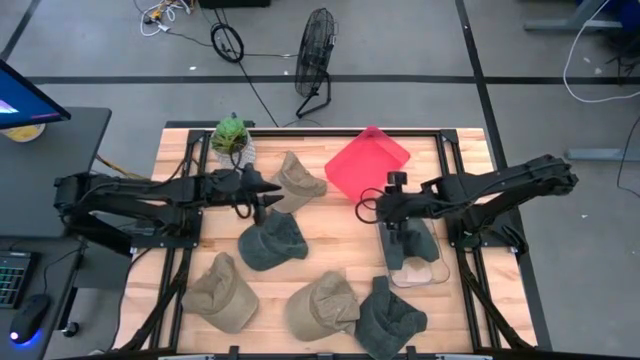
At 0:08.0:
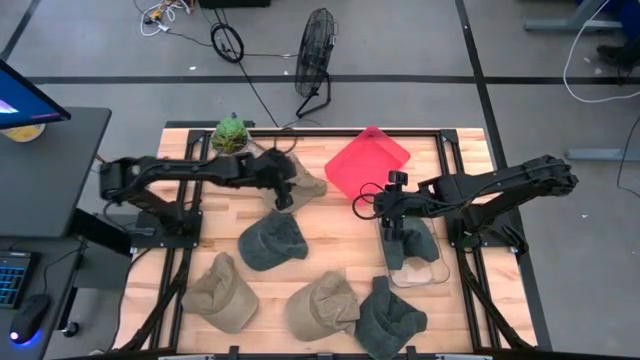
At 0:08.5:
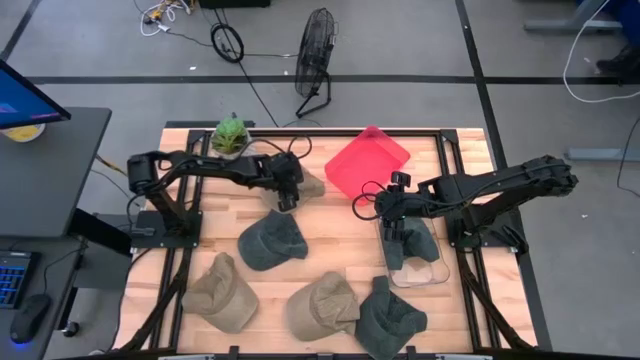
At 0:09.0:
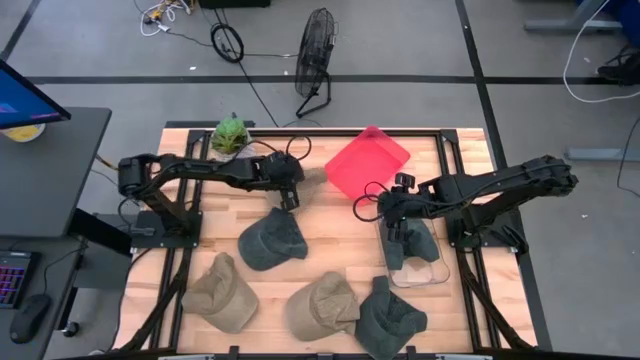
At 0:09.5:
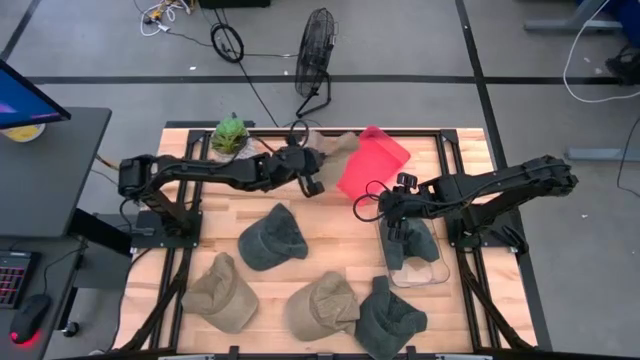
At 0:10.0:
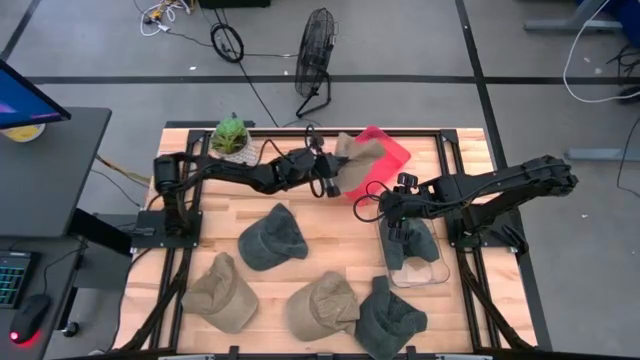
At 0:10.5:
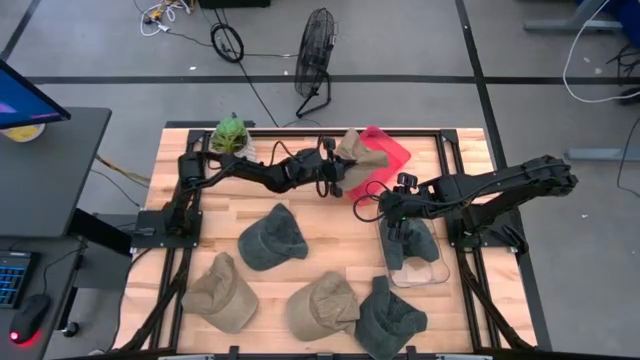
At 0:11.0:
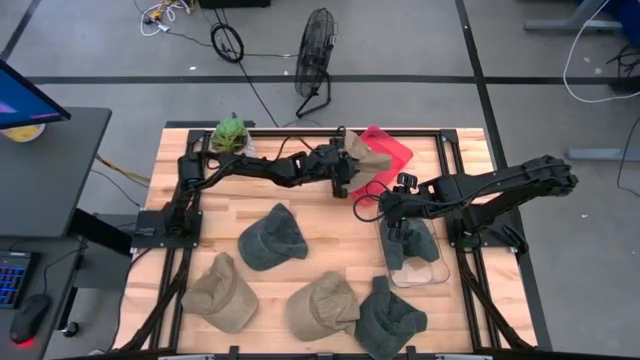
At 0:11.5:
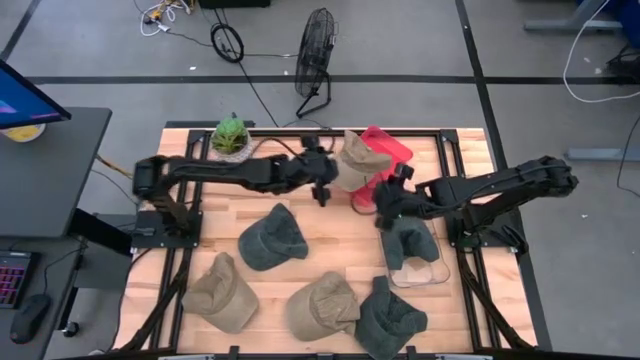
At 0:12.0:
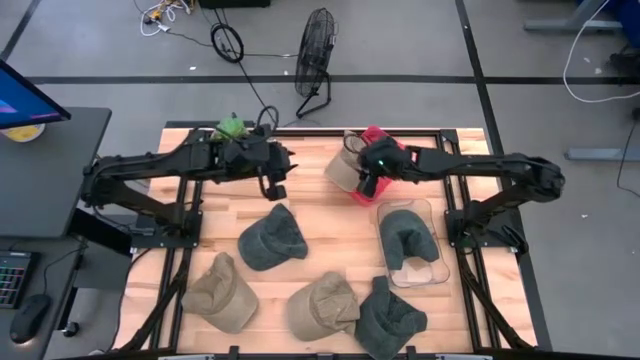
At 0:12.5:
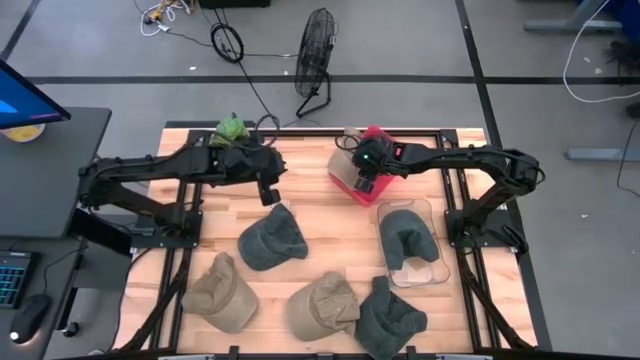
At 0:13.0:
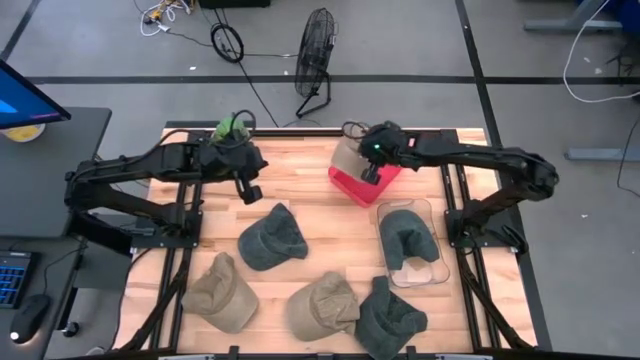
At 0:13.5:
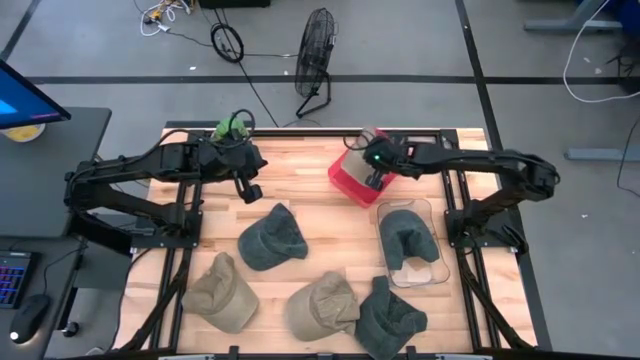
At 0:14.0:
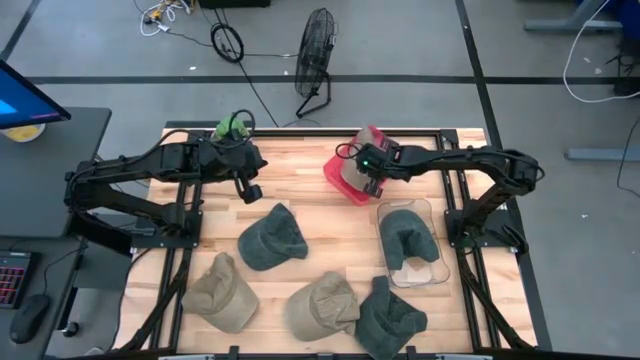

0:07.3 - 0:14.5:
Task: Pick & Place hat
Put the top brown cap into the red bin

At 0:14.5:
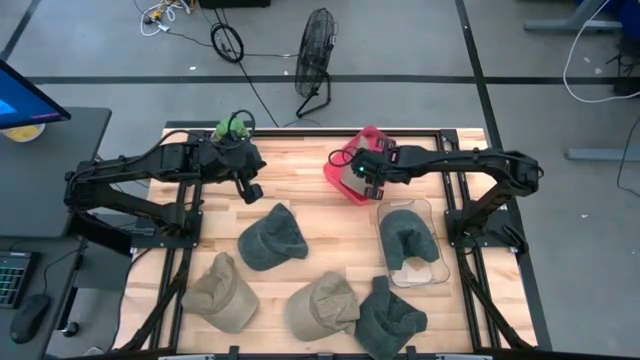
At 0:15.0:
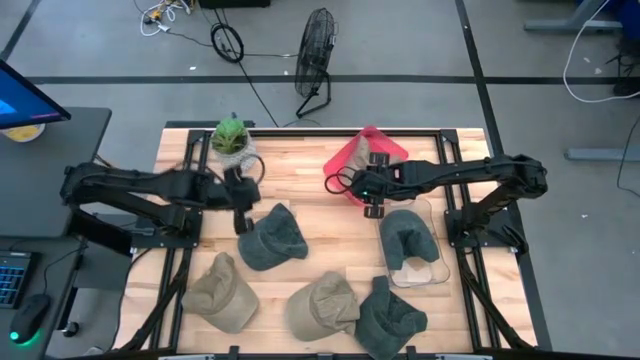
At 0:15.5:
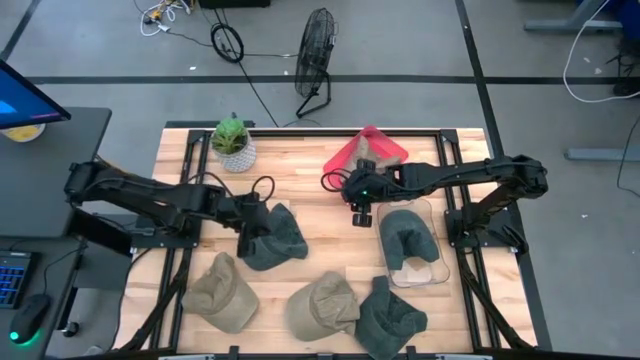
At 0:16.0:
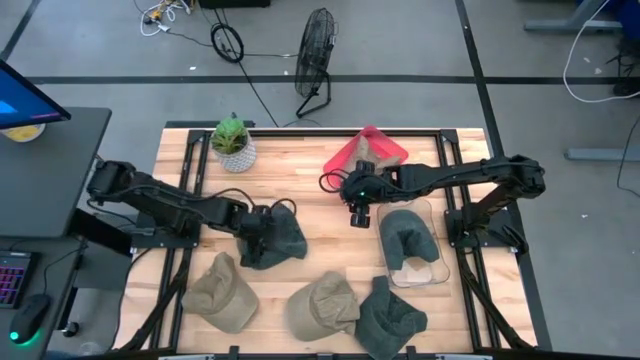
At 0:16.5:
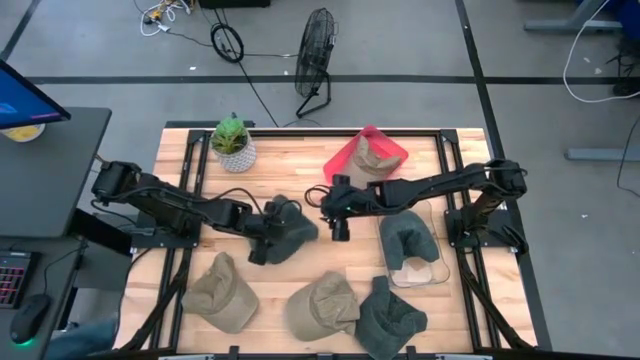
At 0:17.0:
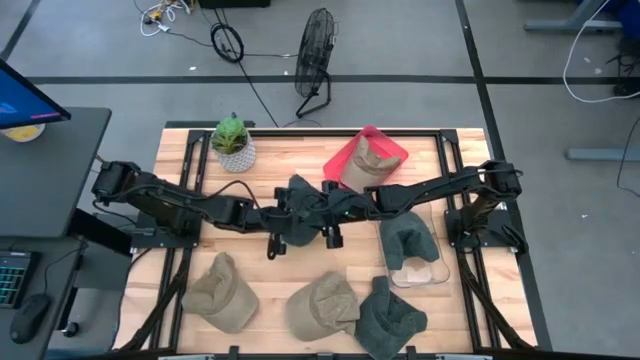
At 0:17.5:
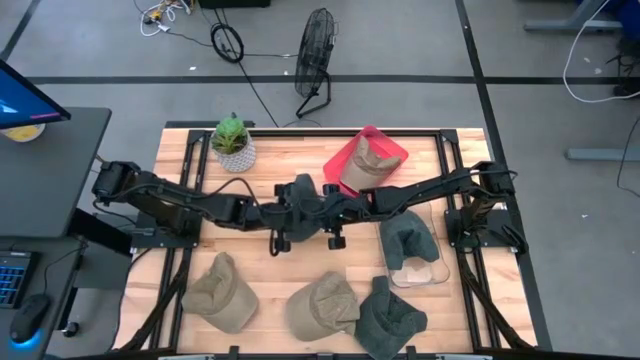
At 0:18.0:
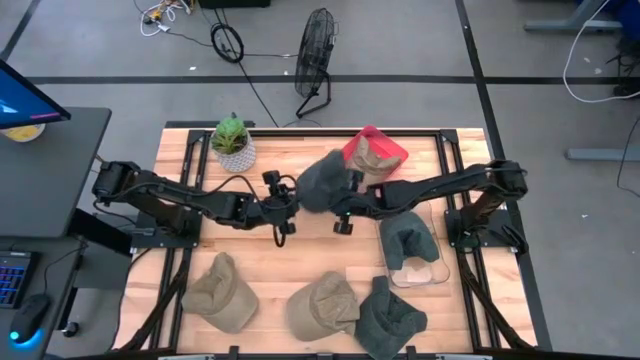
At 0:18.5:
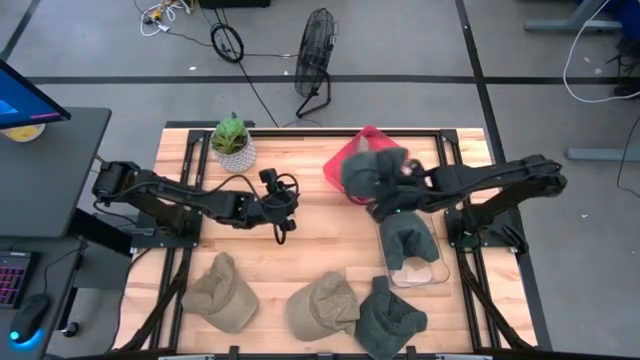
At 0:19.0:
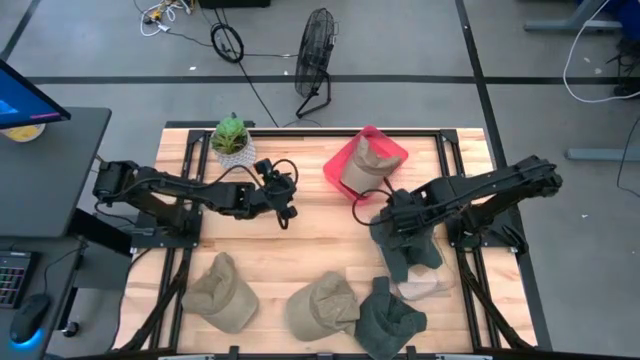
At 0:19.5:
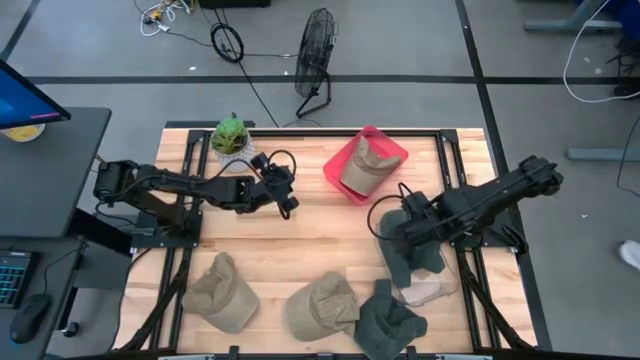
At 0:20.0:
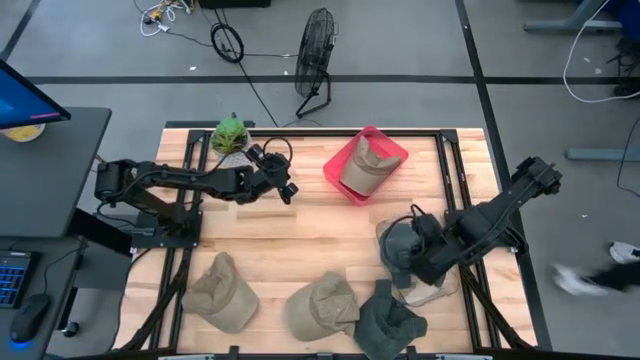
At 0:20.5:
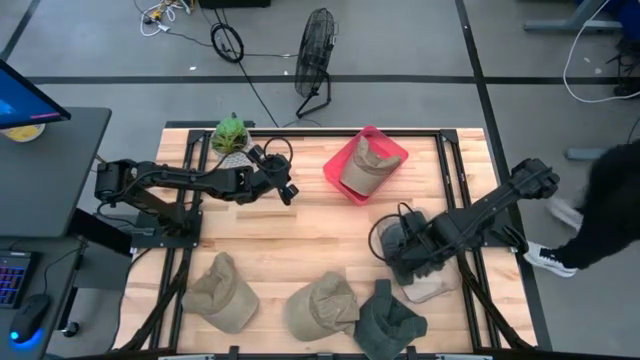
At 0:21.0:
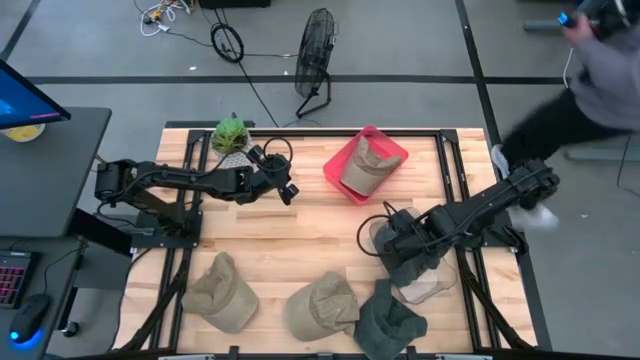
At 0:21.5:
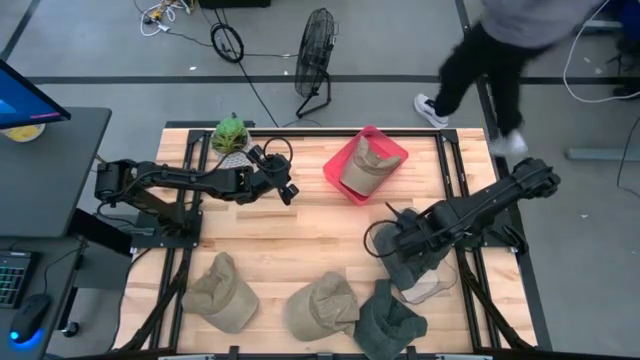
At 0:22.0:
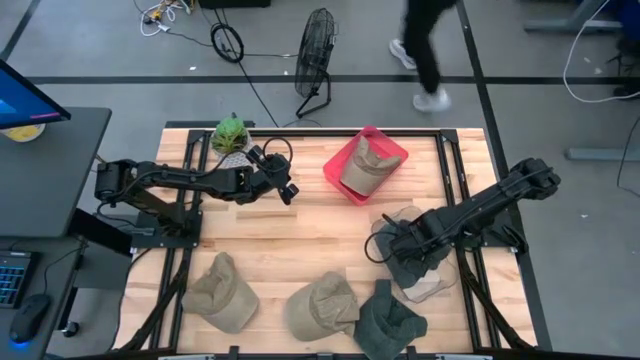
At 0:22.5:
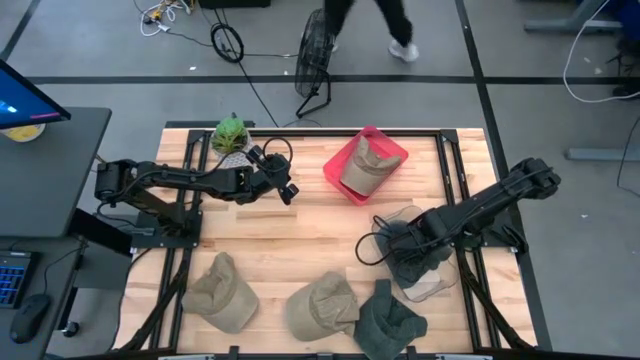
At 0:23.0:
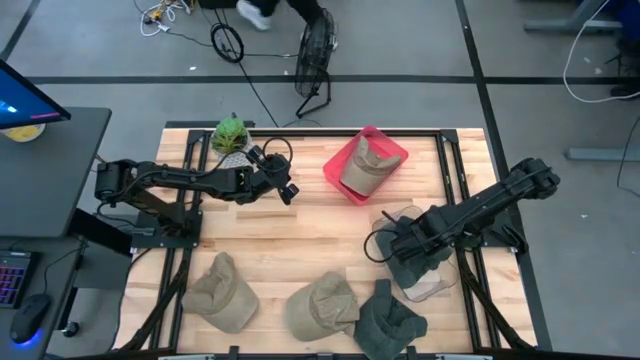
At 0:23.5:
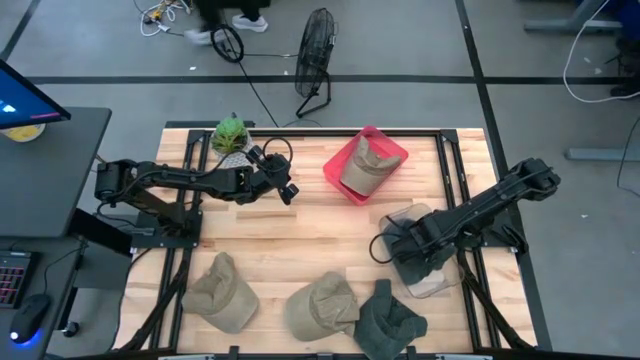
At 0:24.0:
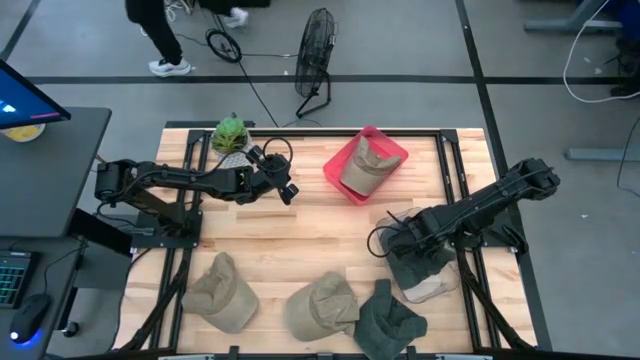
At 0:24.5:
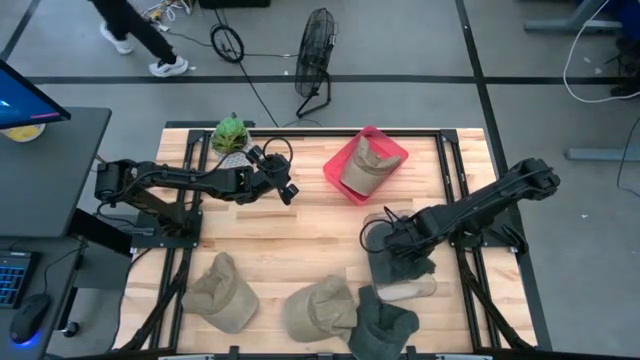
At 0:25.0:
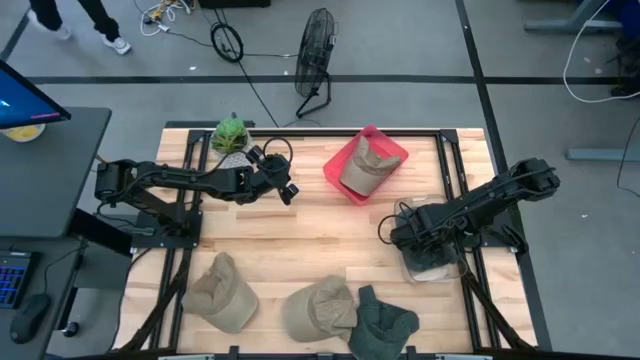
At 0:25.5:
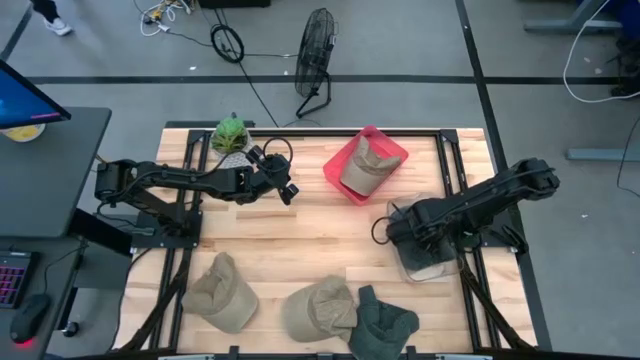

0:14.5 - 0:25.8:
Put the left gray cap into the transparent bin

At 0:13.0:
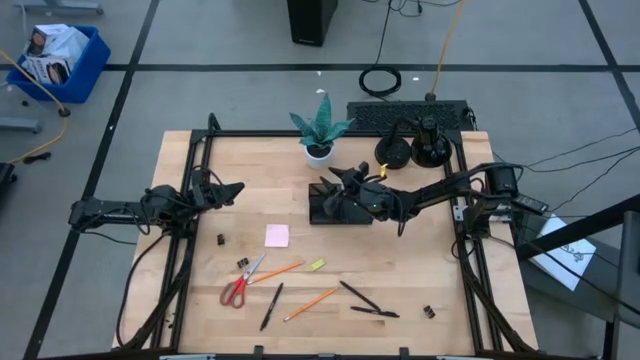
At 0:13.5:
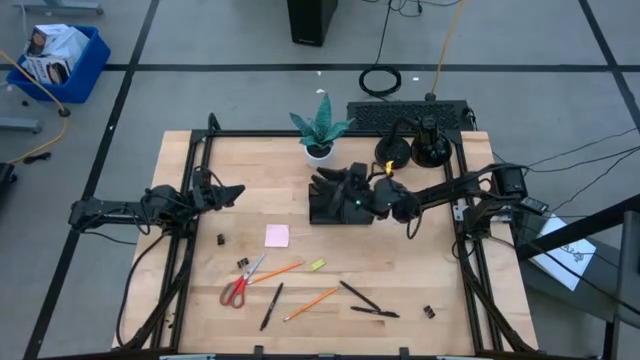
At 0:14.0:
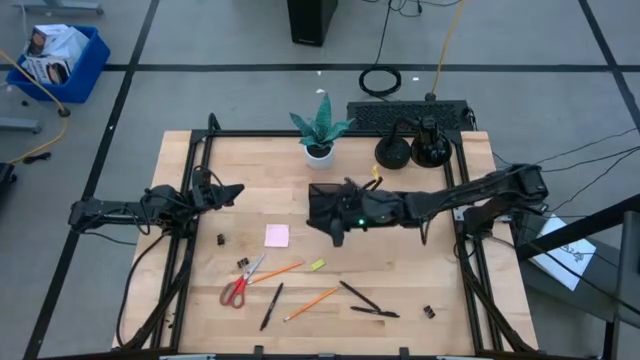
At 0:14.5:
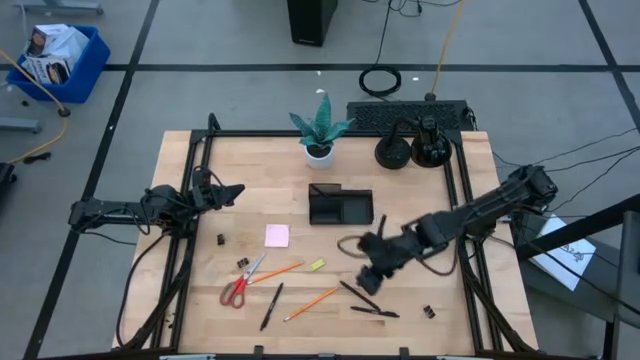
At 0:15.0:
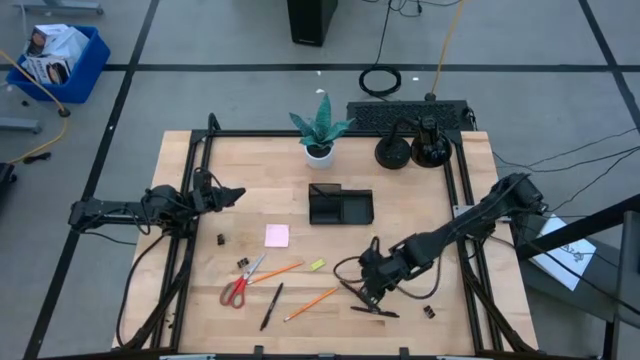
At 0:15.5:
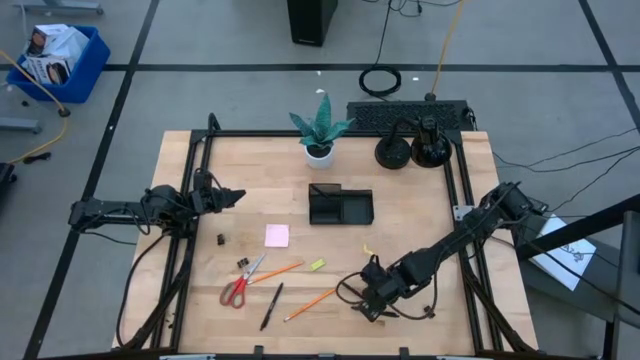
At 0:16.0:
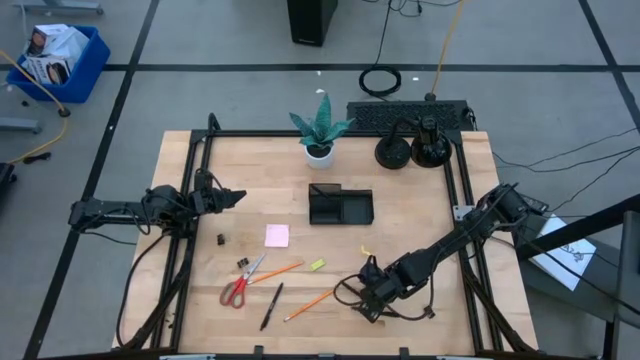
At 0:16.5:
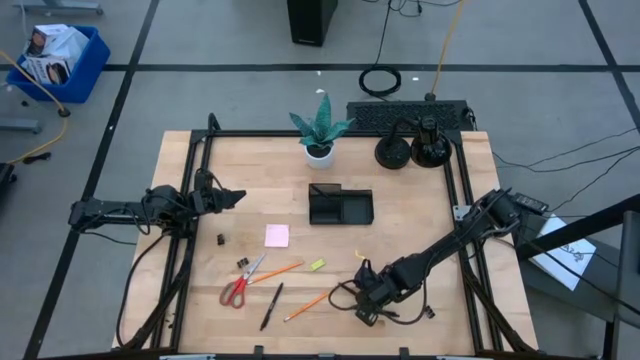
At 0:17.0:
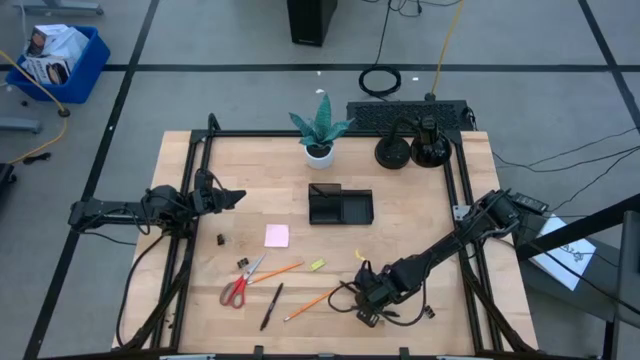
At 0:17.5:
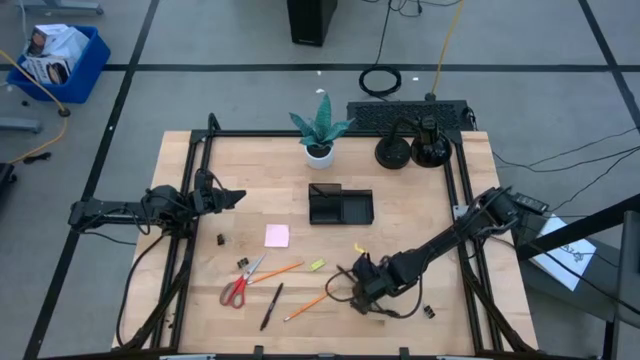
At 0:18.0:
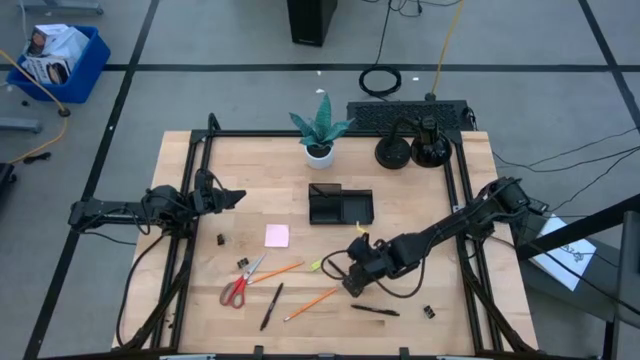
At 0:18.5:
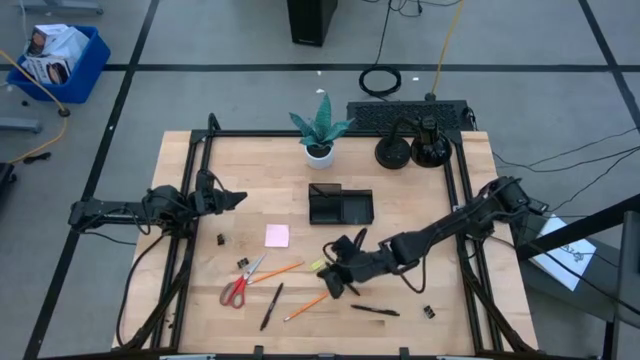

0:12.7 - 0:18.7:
Task: Pick and place office supplies into organizer
Put the black pen into the black desk organizer
